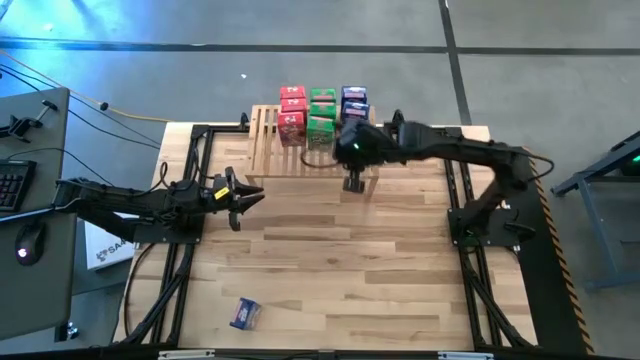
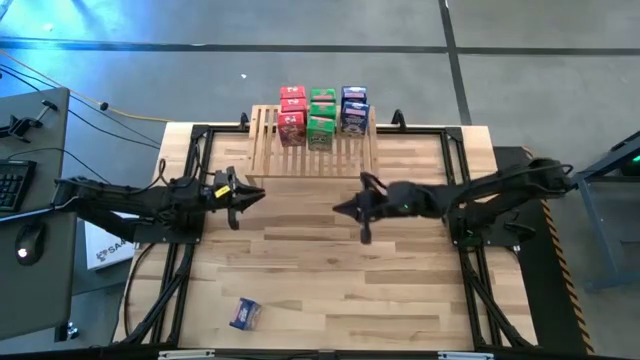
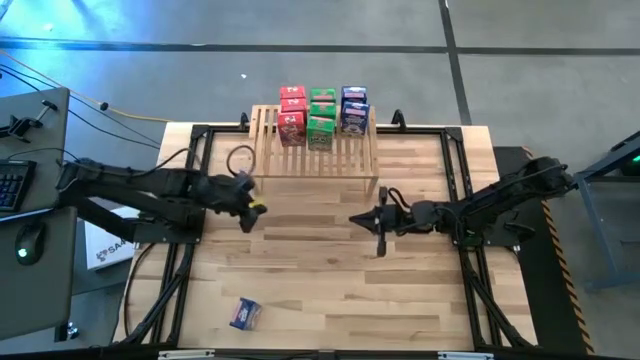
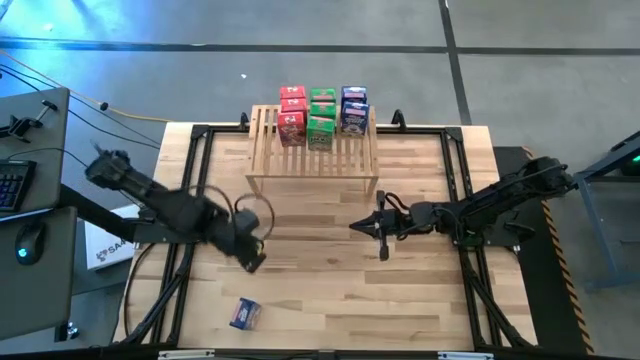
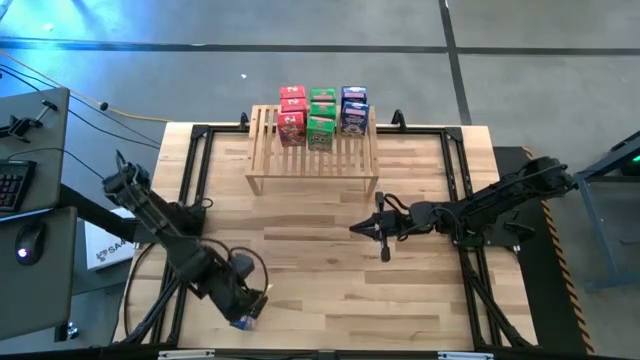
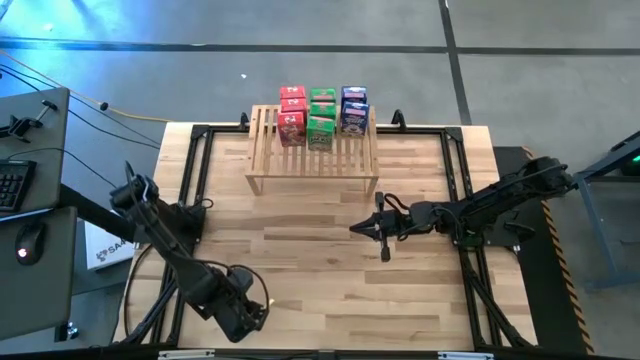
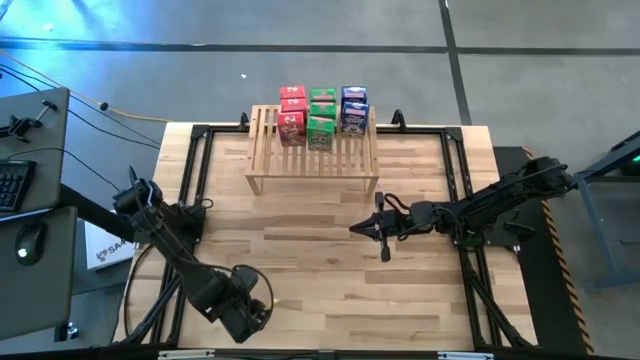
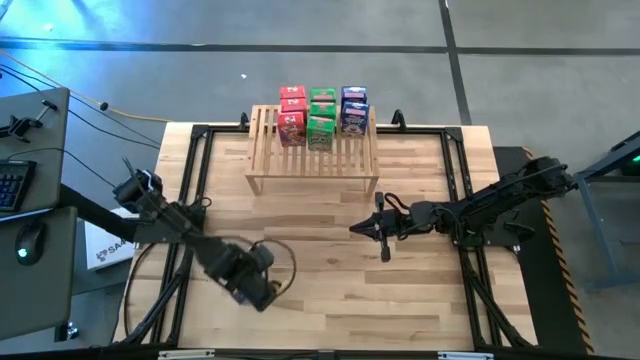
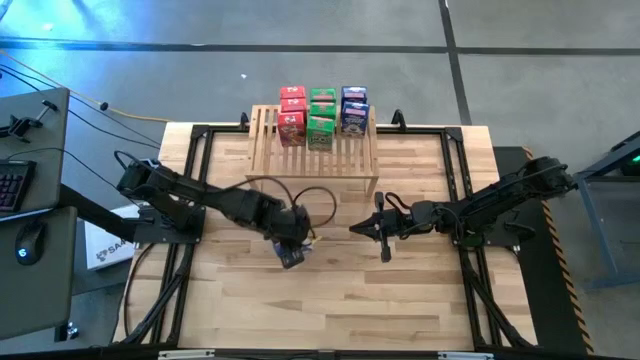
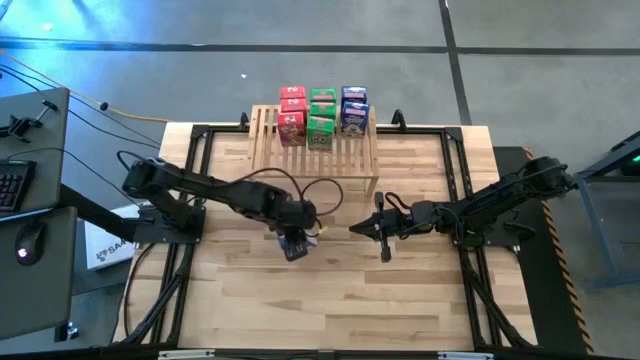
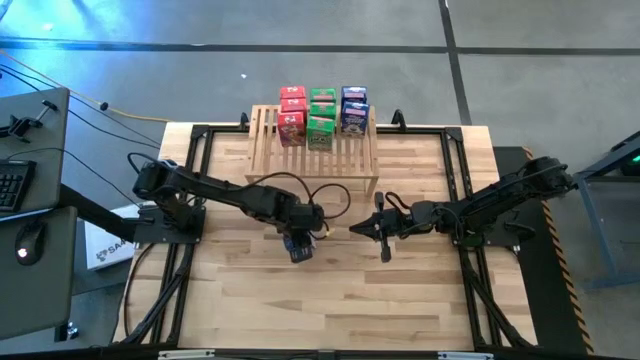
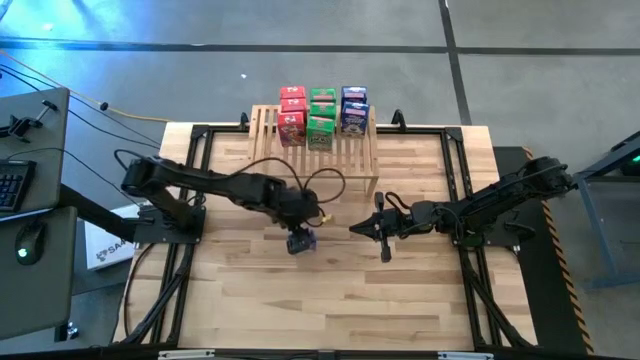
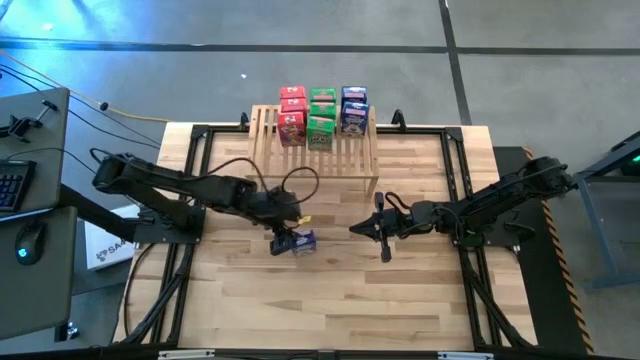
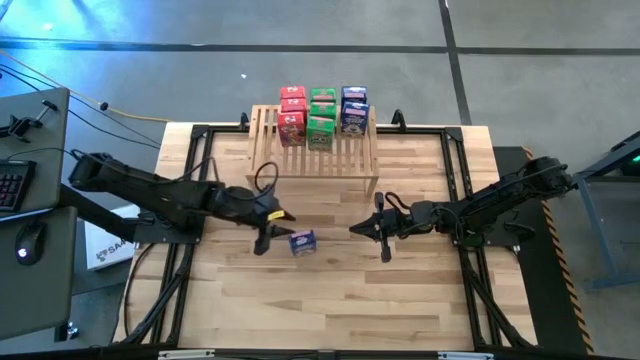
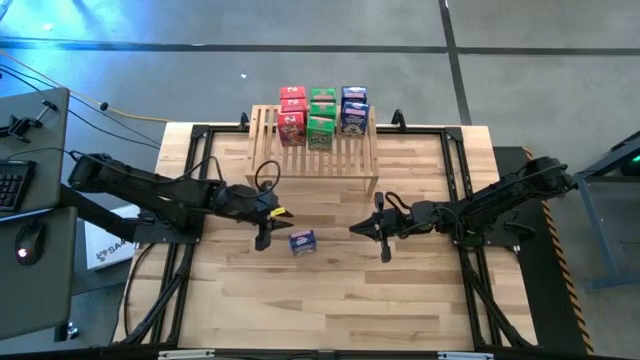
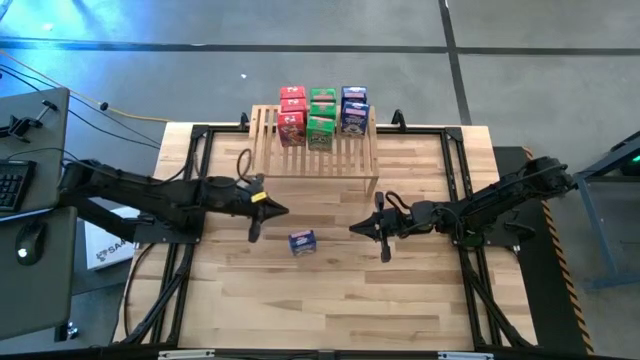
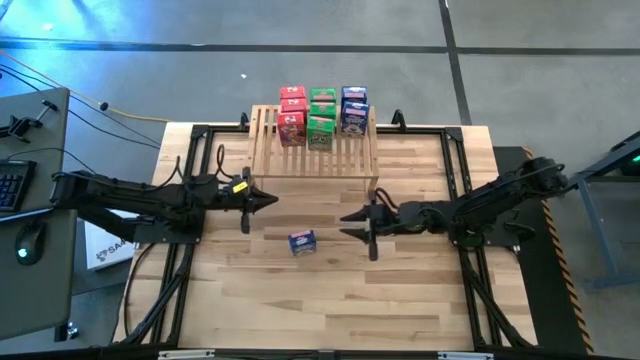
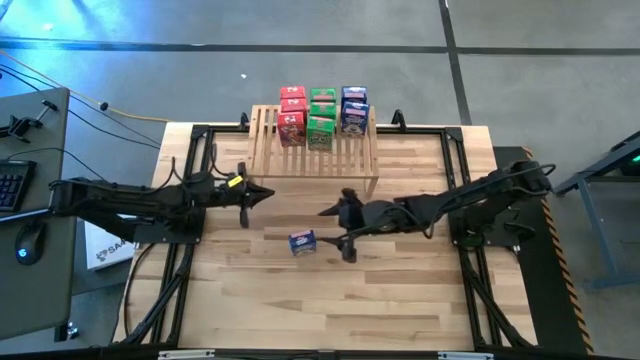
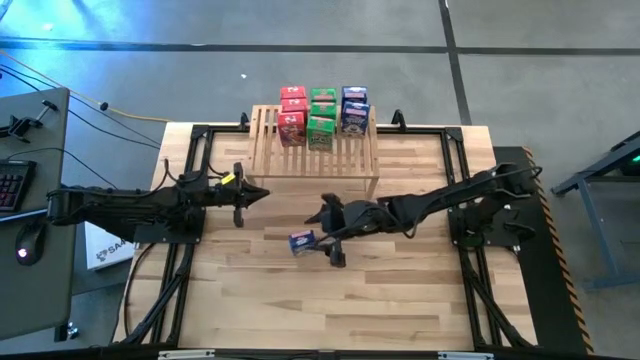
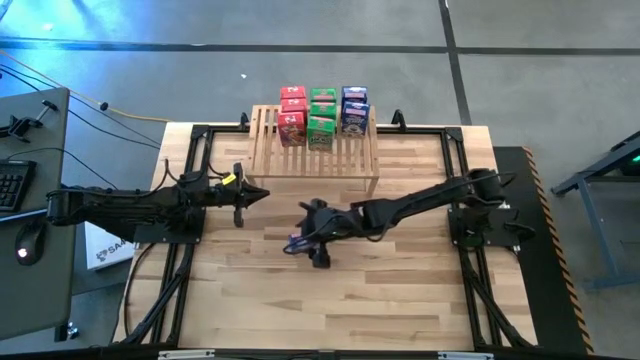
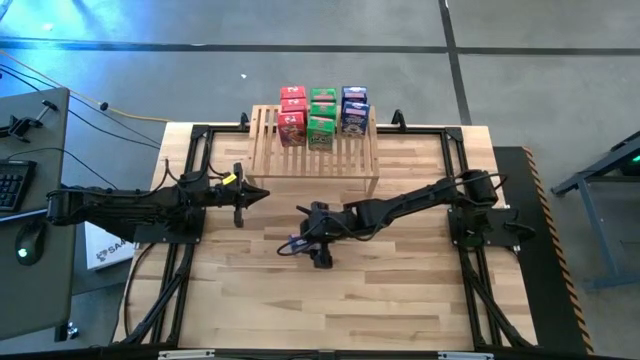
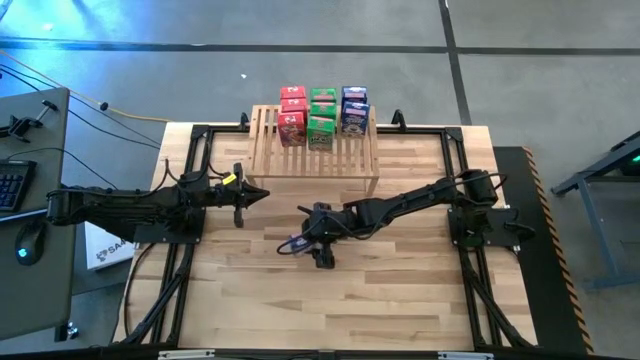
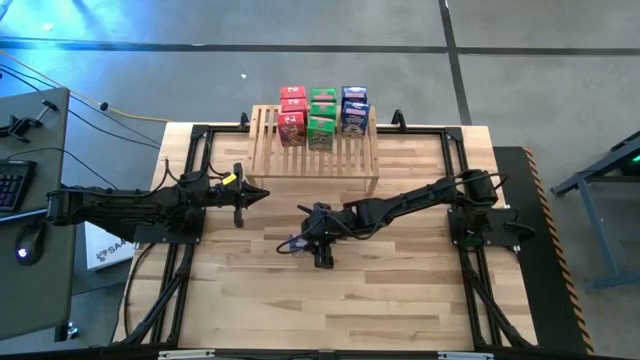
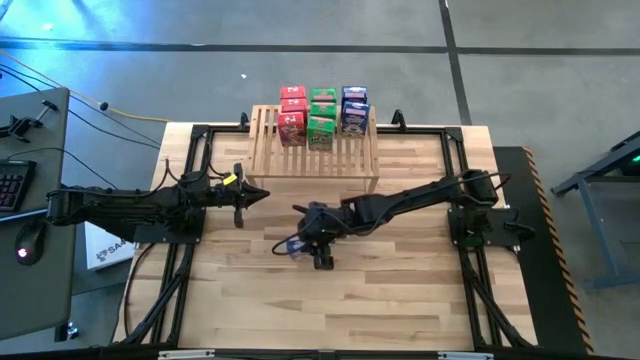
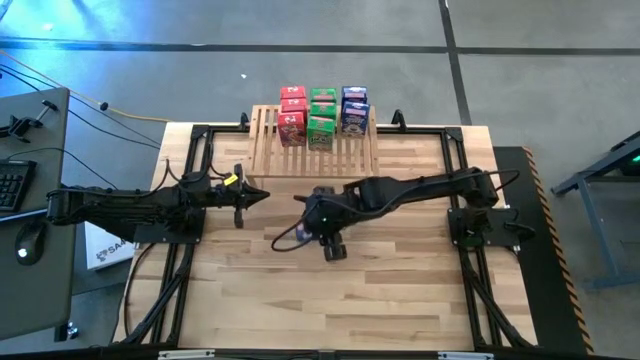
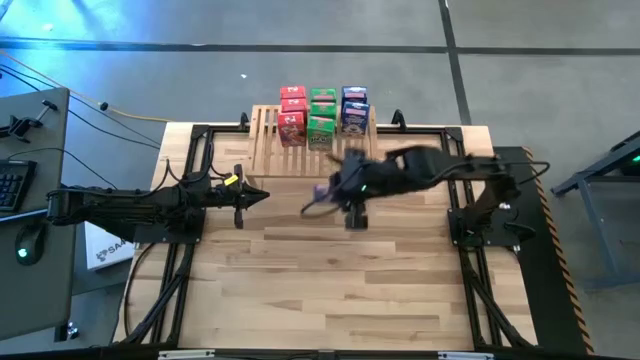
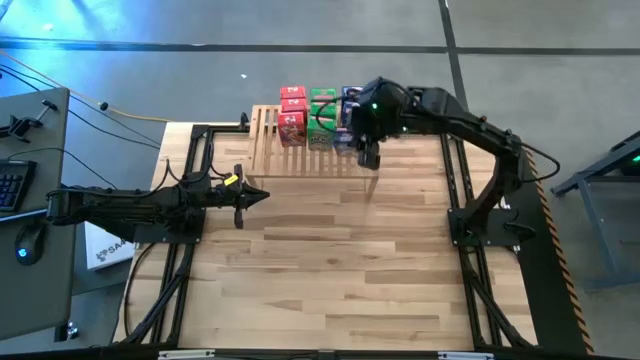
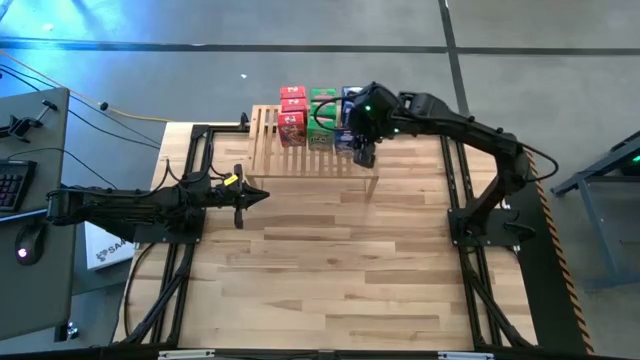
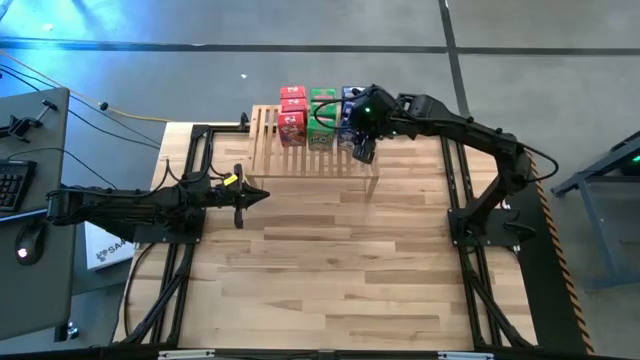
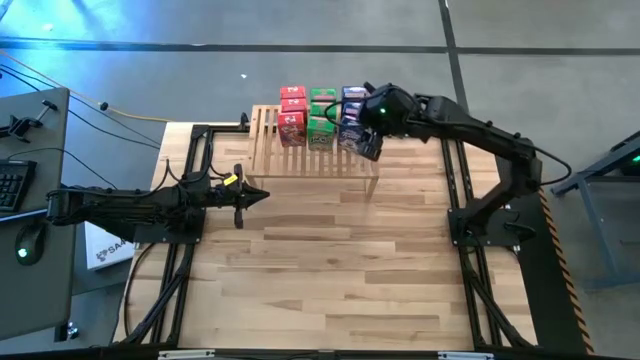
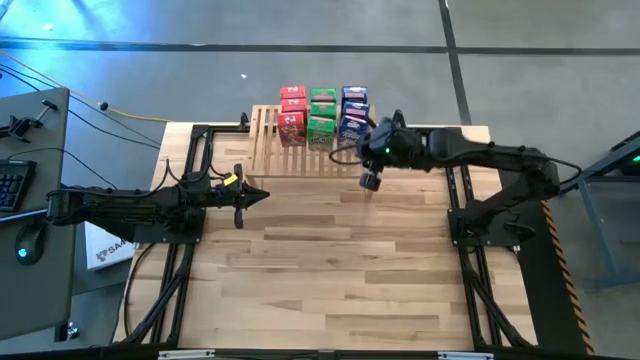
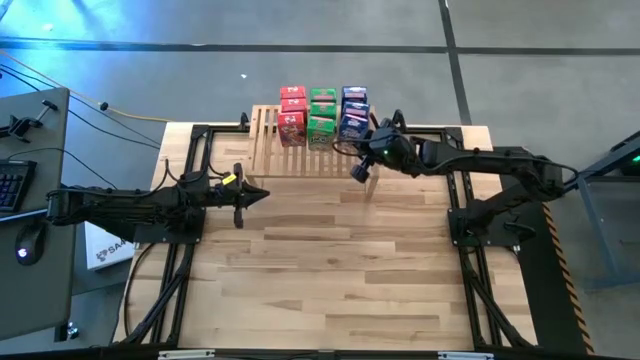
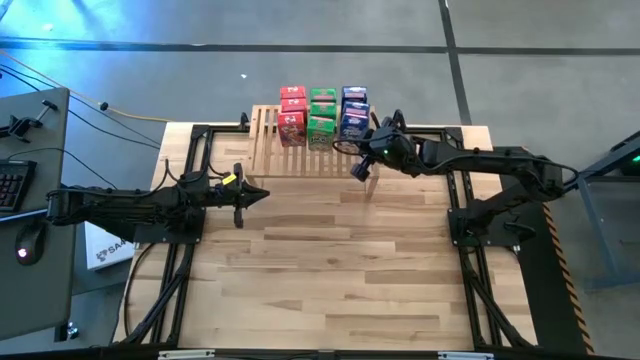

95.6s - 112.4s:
Task: Stack cereal on shelf
Put the blue cereal box on the shelf aligned with the other blue cereal boxes

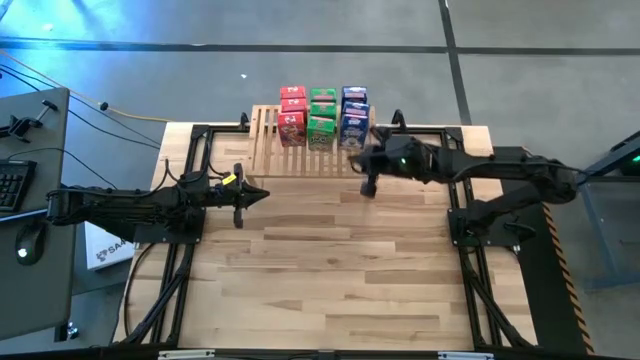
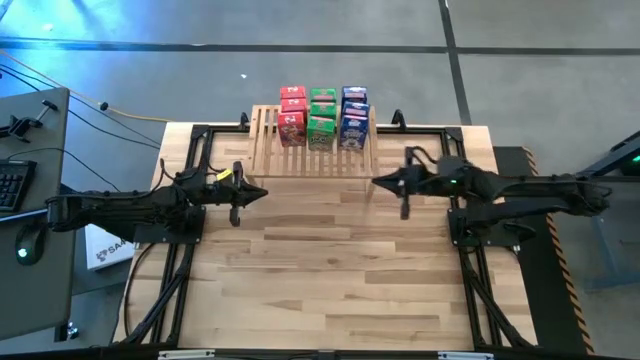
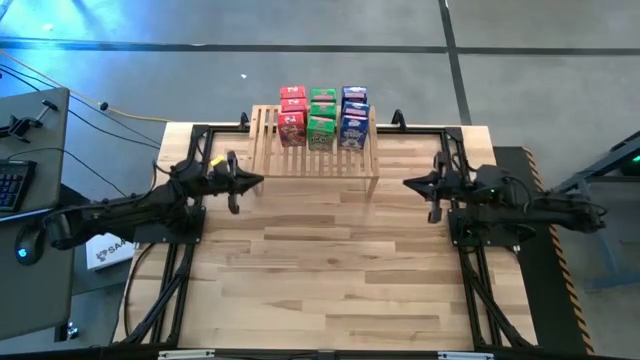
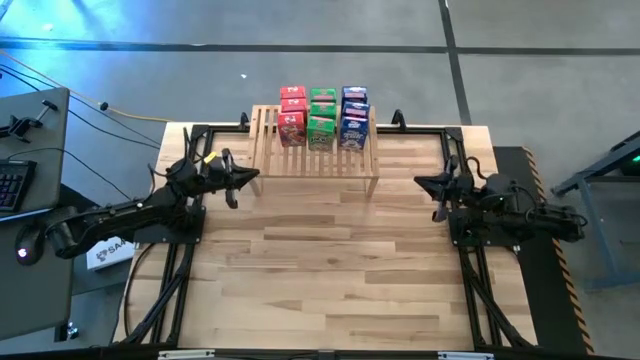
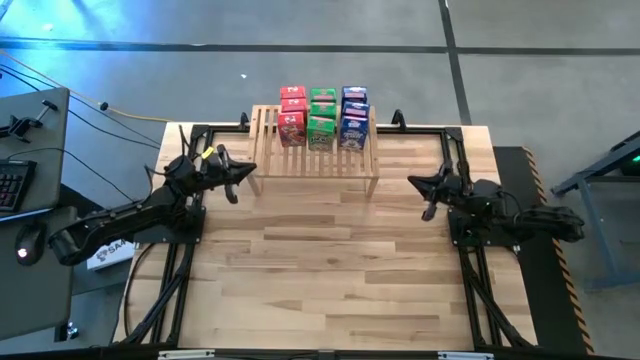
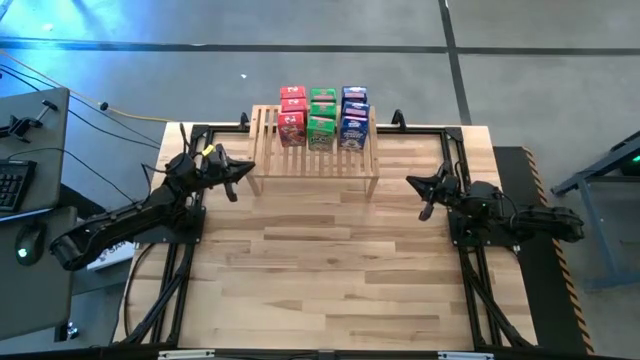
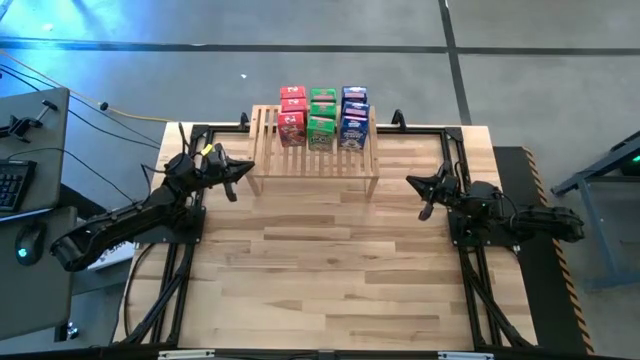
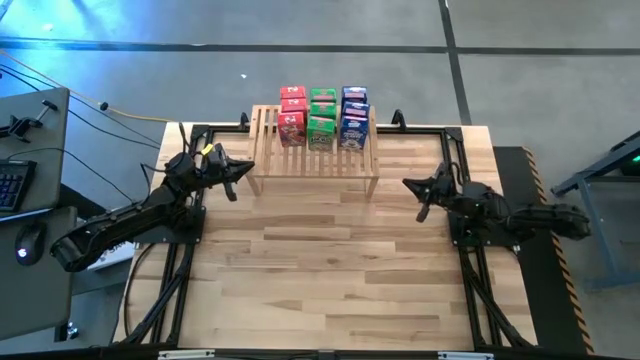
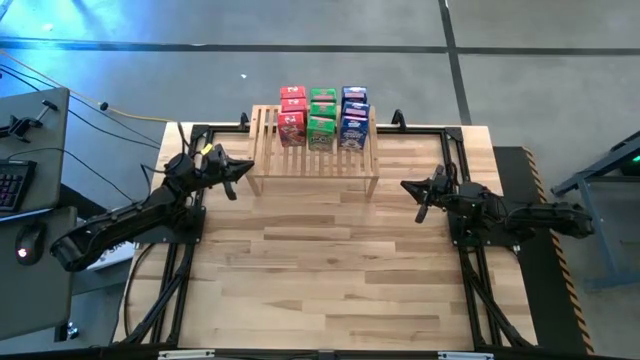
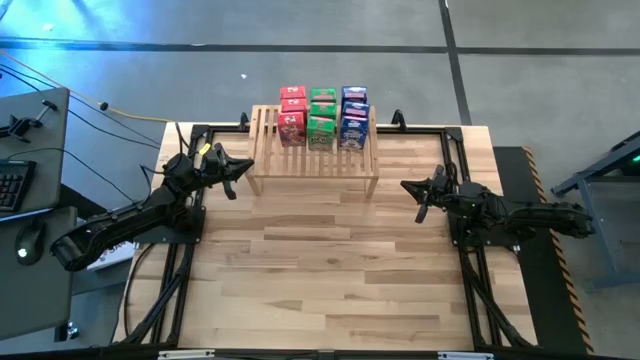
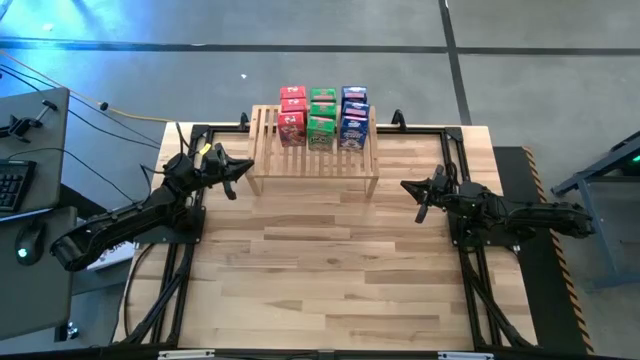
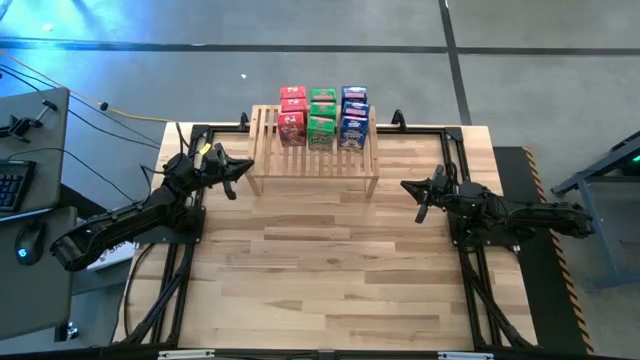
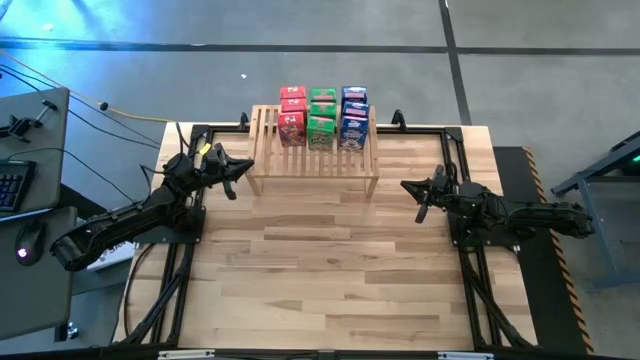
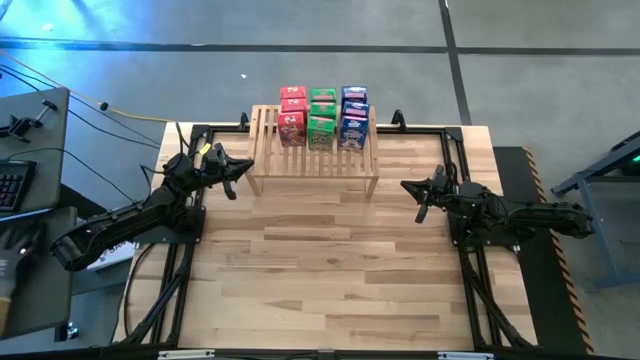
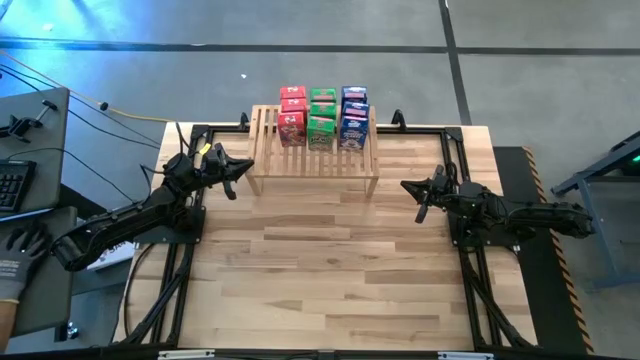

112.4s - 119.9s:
Return to Home Position
